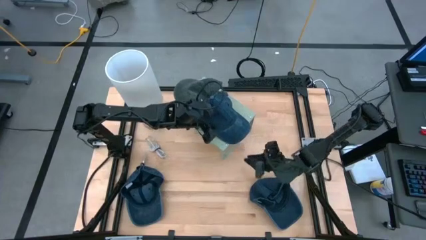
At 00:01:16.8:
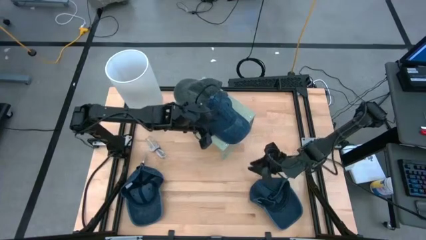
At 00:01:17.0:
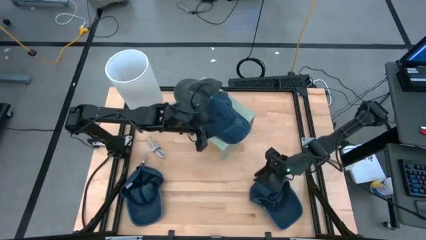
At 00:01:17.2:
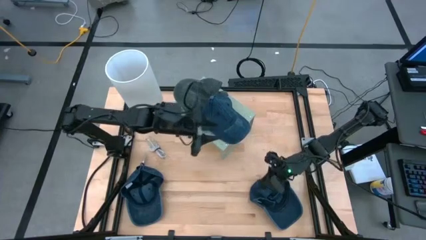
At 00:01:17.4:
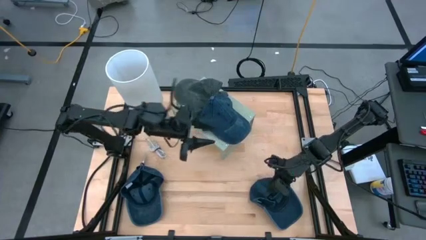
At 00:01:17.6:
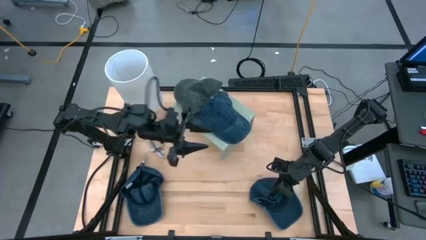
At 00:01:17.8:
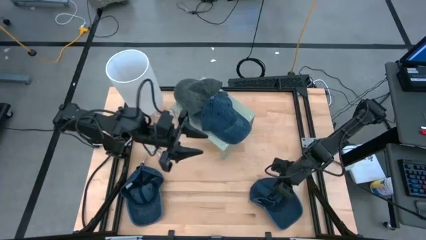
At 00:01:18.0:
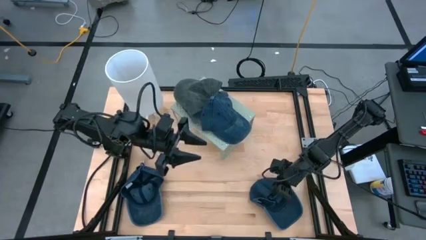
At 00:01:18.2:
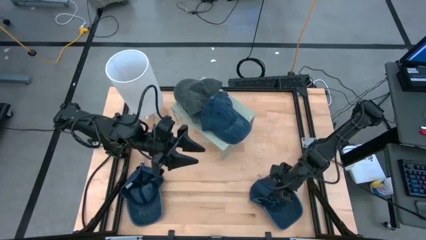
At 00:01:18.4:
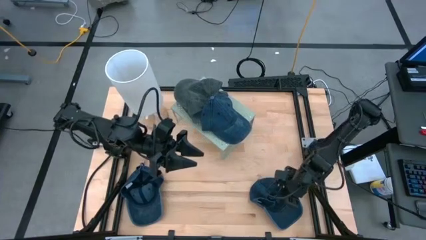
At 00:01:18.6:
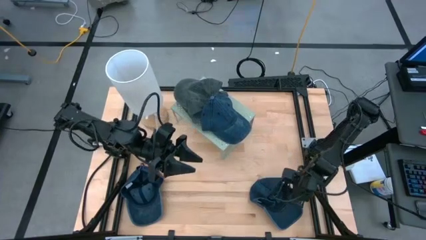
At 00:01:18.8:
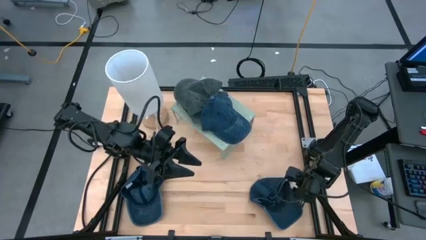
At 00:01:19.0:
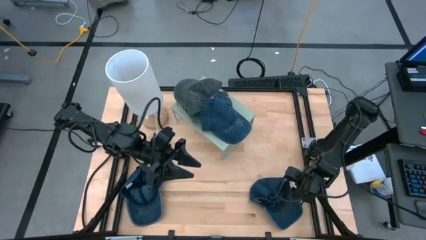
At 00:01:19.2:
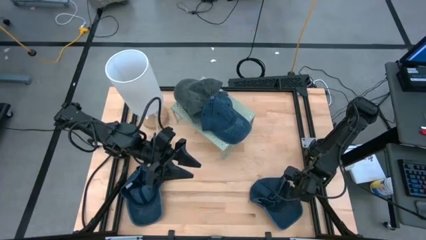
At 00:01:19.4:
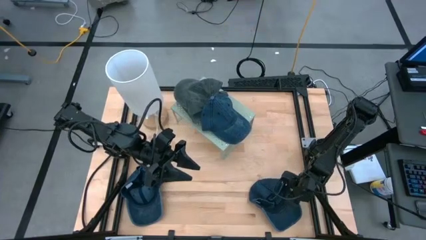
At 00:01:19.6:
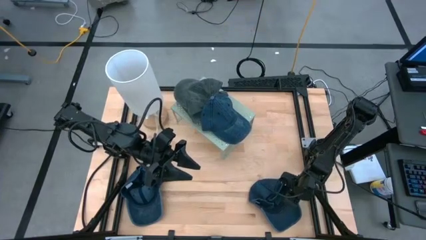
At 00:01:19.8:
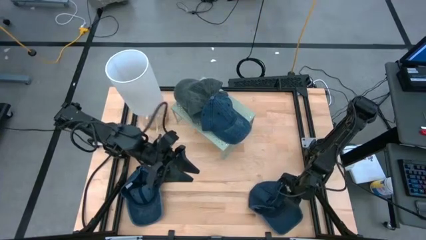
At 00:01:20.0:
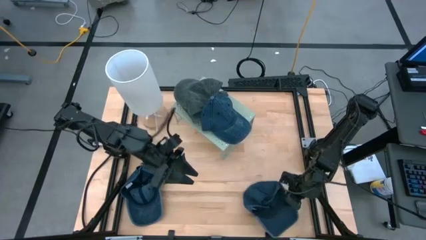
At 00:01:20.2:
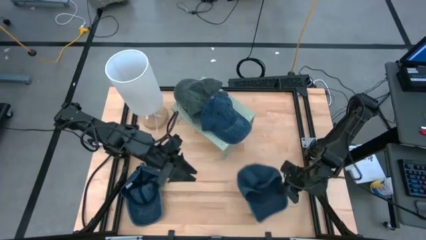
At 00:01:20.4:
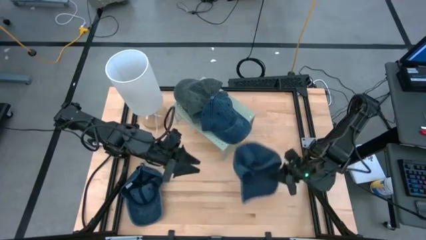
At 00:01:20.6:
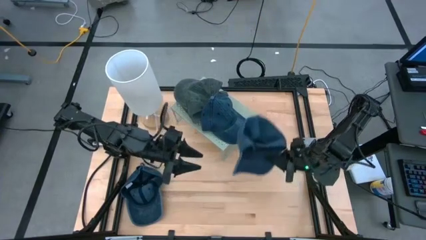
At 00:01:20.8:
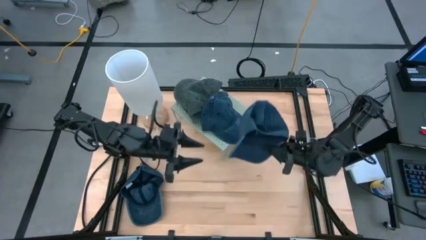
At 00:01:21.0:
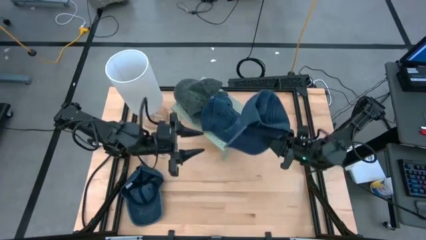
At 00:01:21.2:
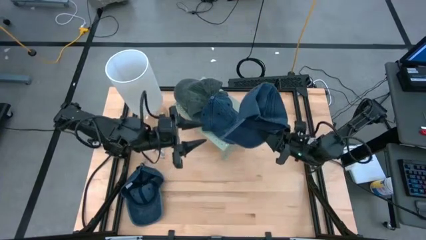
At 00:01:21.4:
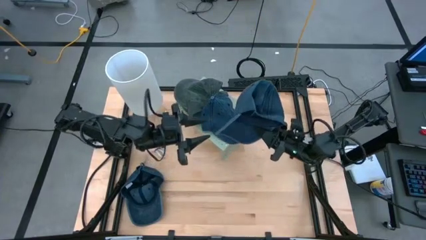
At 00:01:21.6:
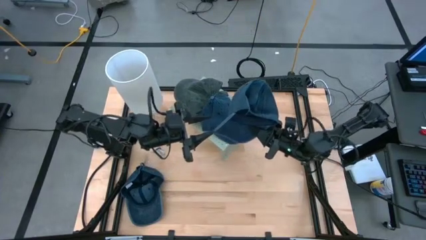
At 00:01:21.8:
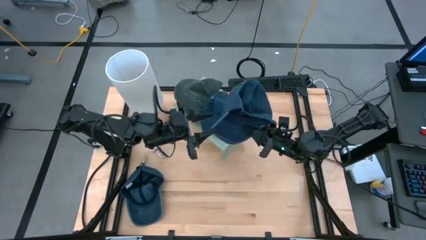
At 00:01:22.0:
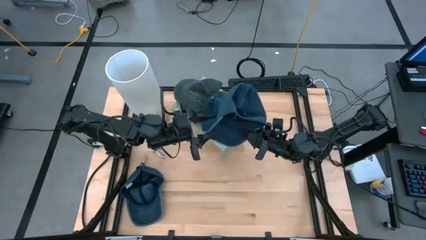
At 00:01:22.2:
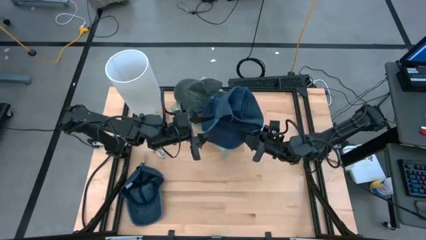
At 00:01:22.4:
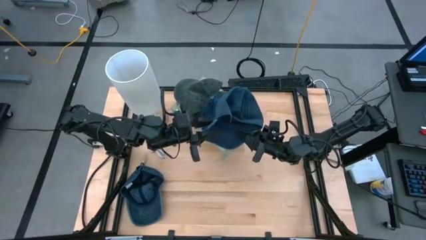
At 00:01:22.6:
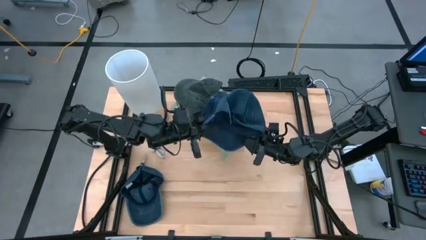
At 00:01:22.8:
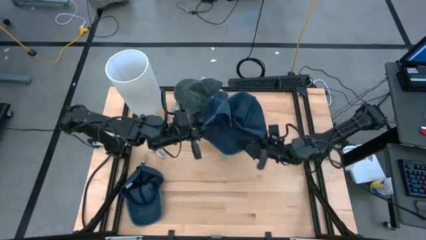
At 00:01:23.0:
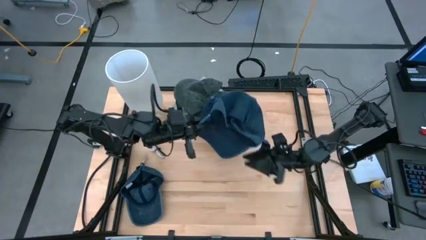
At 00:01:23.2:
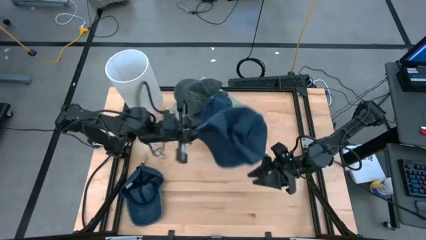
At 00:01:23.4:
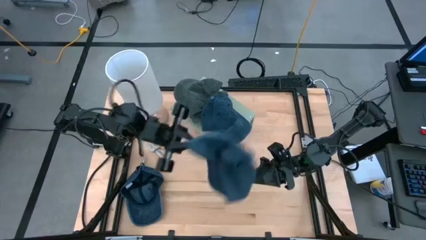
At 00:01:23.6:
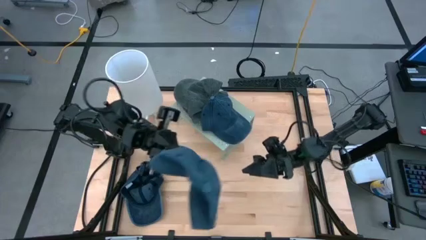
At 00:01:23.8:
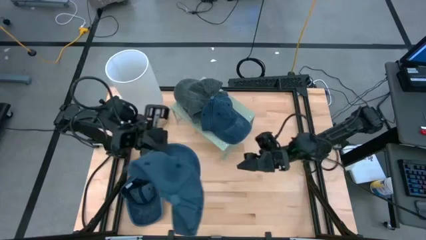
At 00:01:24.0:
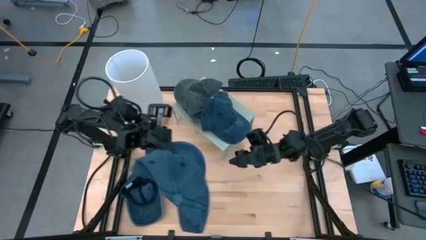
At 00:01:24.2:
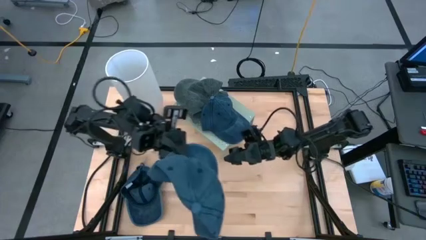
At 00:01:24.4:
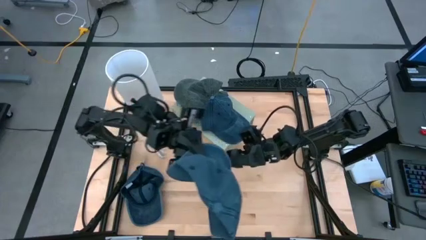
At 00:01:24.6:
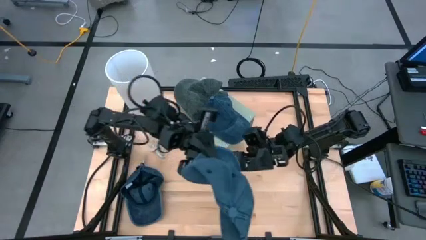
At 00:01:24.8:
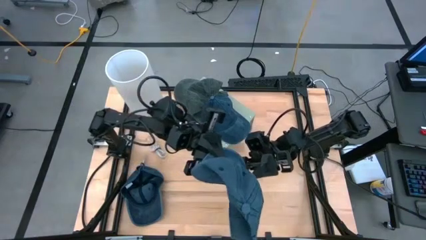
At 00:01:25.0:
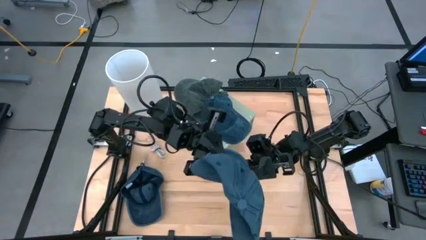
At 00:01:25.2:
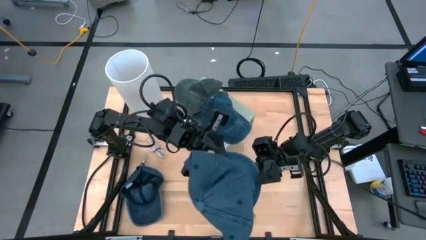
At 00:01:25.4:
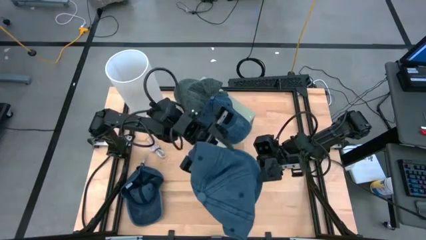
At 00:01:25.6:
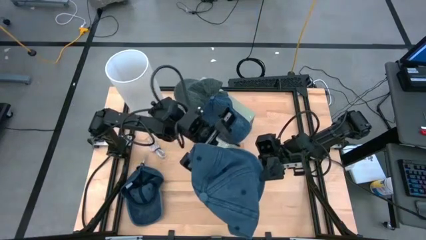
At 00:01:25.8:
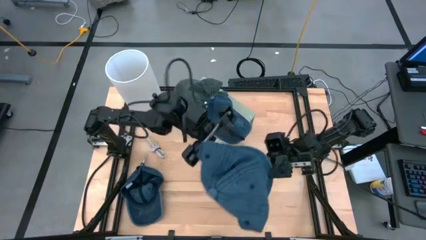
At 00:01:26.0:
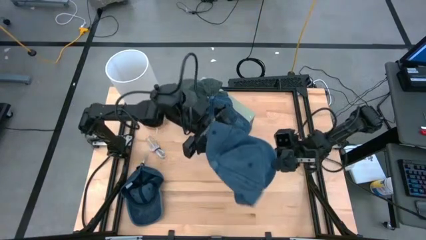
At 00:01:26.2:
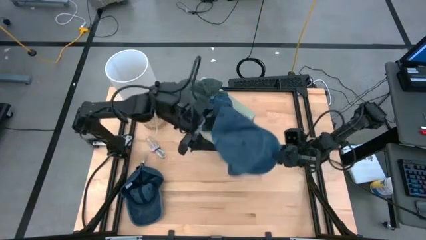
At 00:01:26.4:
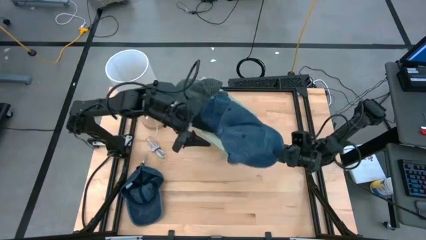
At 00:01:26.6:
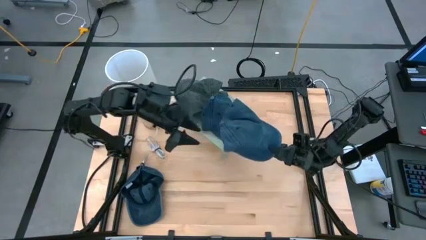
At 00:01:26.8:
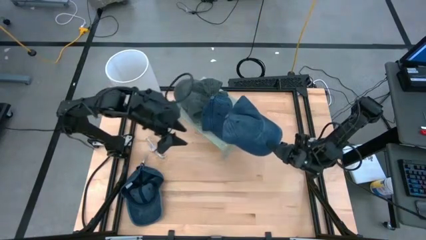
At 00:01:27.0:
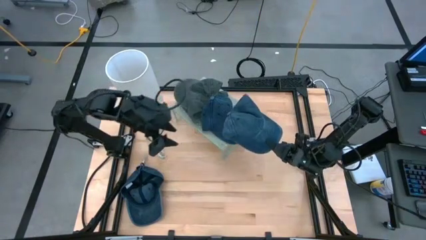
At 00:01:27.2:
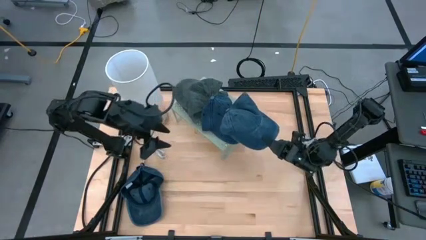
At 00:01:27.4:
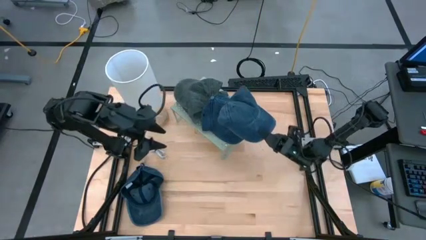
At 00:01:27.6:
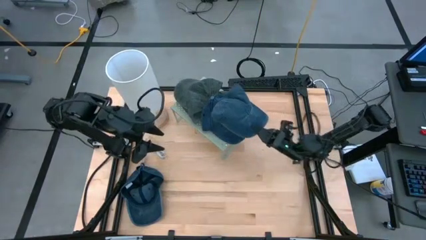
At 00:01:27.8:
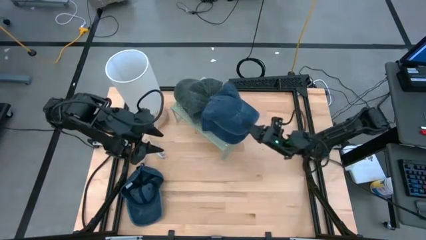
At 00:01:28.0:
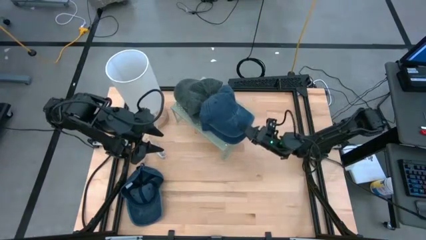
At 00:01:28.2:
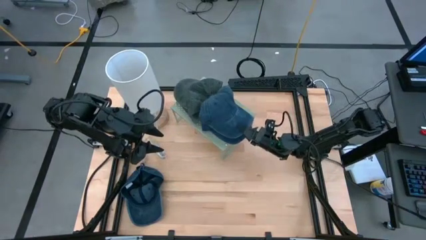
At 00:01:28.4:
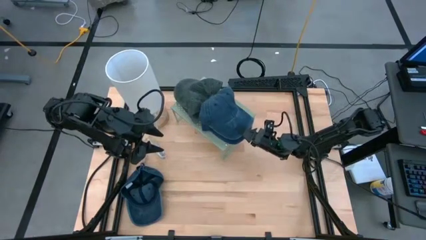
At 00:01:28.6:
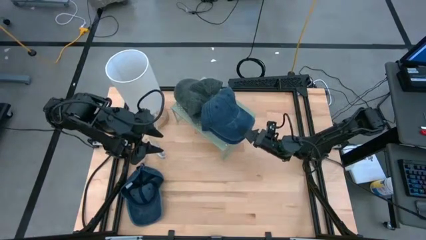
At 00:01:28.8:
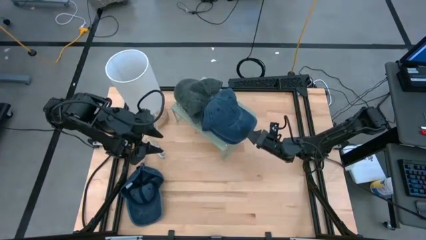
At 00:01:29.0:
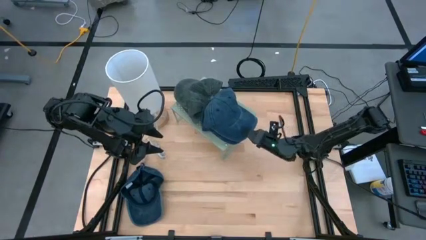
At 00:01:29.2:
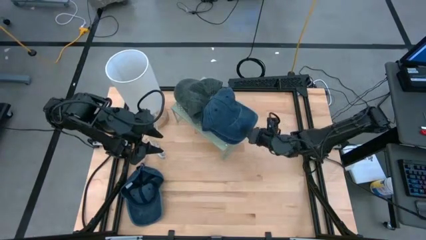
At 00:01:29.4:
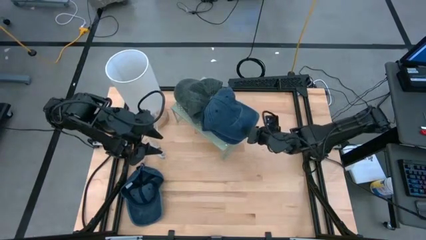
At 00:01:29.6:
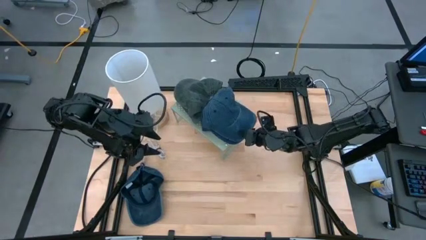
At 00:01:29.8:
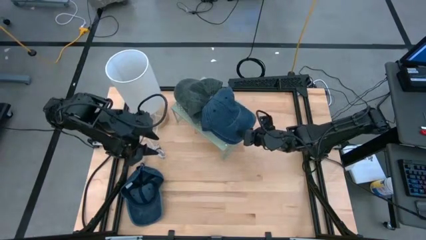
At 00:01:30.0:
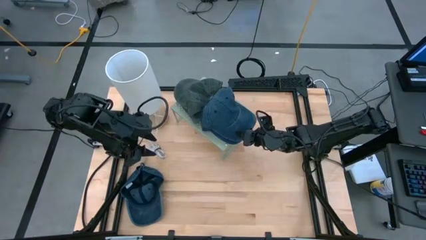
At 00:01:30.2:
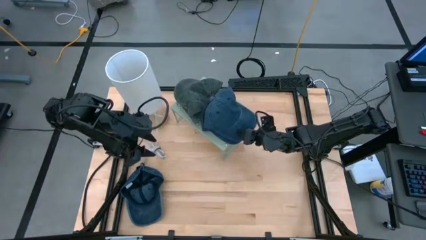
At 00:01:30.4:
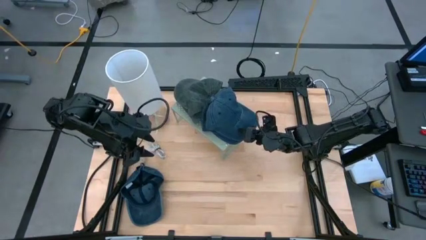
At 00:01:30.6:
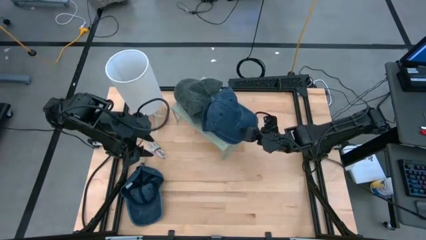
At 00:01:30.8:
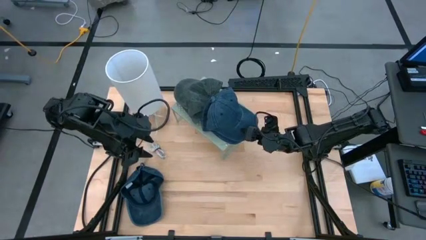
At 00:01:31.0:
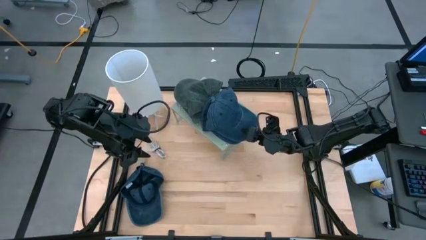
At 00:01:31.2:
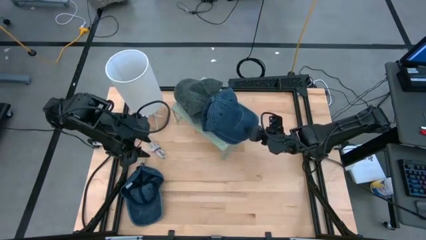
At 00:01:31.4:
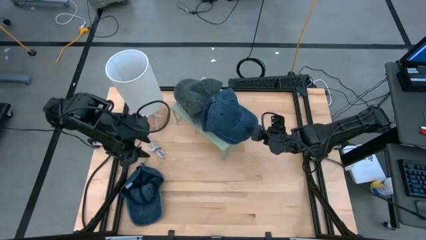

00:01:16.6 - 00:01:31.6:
Task: Pick & Place hat
Stack the right blue cap on top of the blue cap on the shelf

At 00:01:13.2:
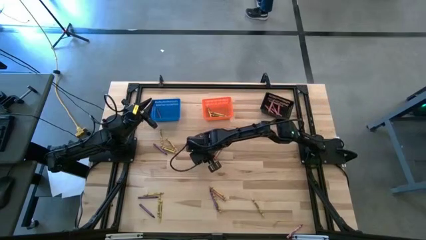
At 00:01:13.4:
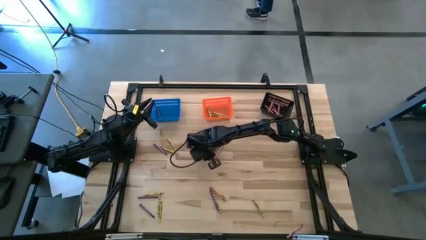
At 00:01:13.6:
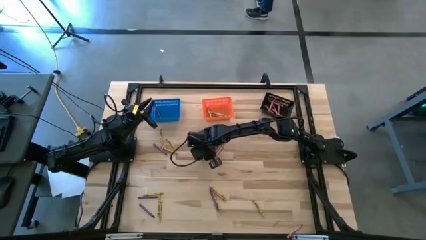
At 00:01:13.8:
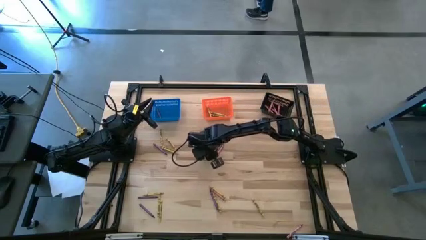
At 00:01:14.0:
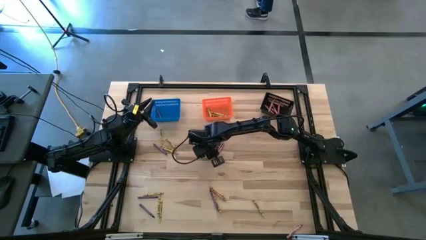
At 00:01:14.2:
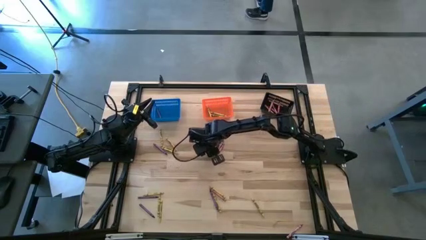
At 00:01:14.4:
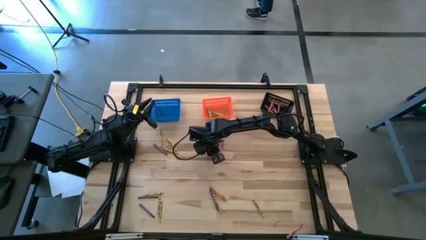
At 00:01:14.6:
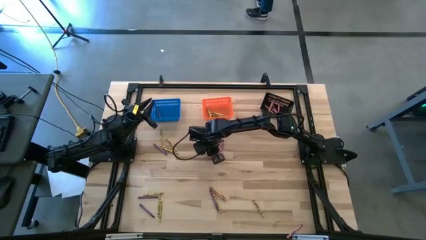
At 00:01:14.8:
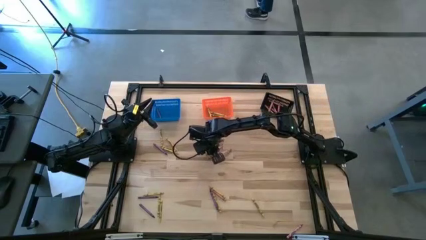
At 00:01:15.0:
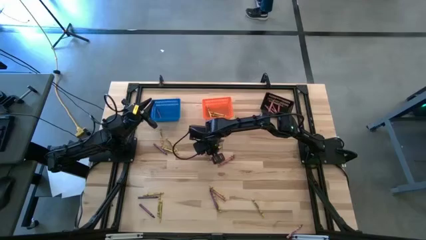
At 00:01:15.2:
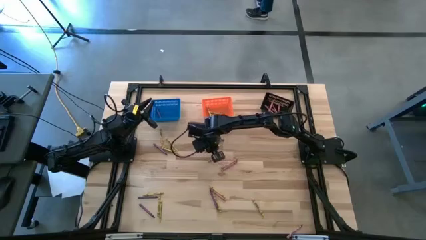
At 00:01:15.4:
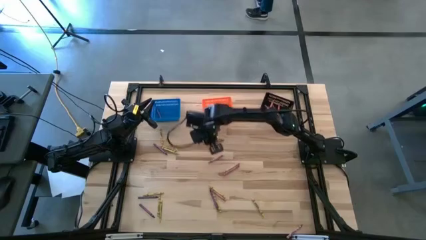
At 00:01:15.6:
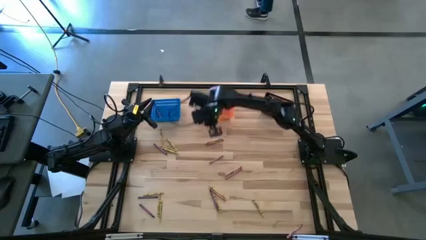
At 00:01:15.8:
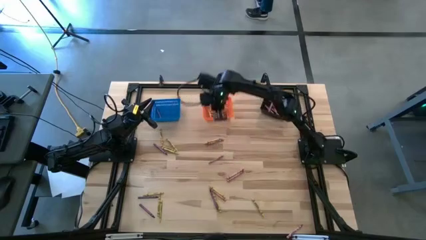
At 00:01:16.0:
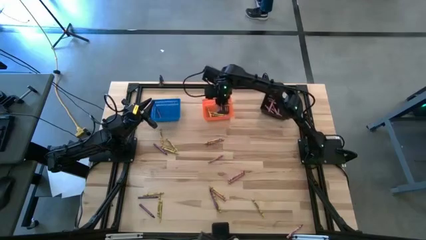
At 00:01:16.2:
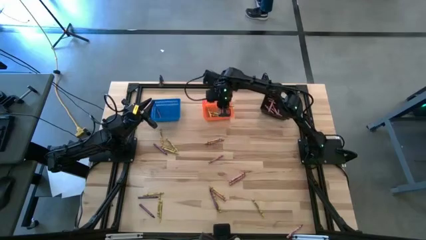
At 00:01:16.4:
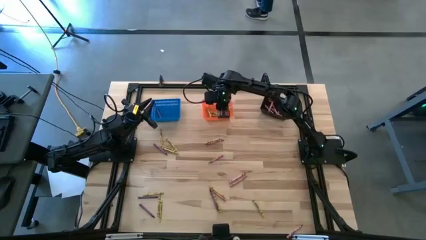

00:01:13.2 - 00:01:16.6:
Task: Sort crayons
Put the yellow crayon into the orange bin
